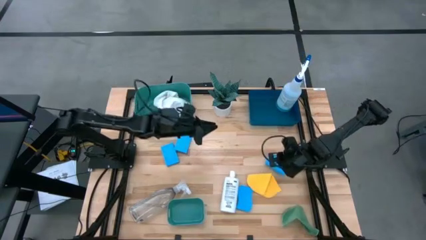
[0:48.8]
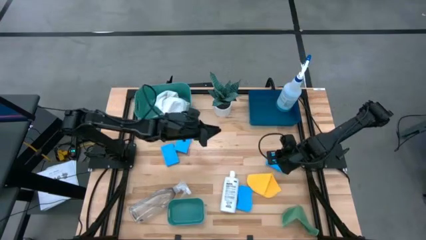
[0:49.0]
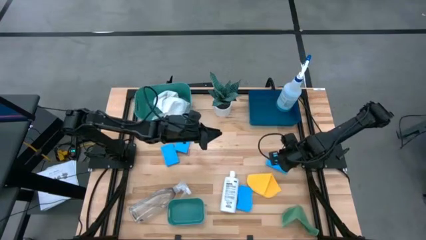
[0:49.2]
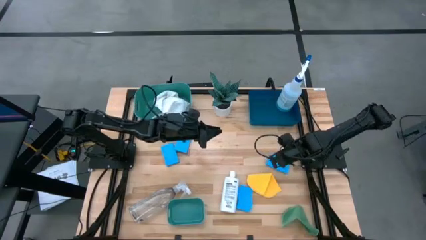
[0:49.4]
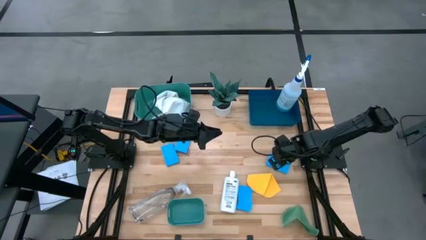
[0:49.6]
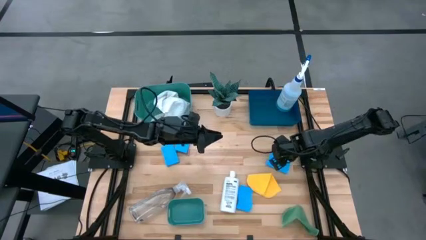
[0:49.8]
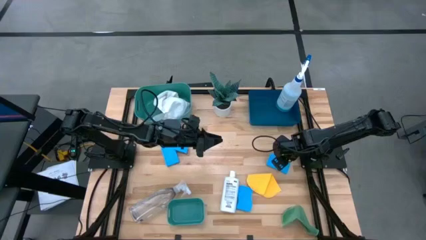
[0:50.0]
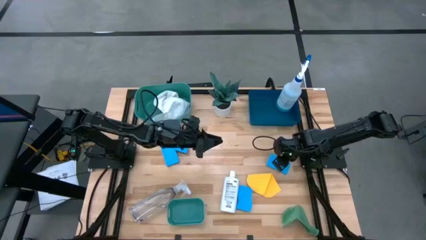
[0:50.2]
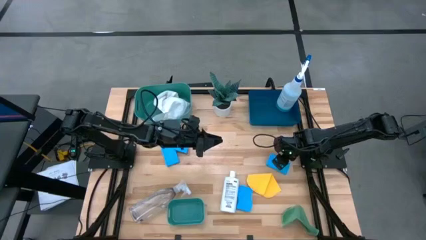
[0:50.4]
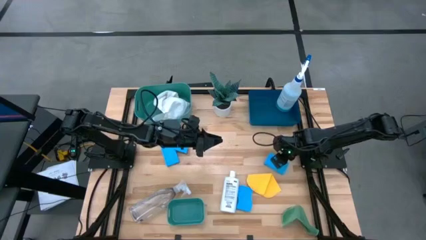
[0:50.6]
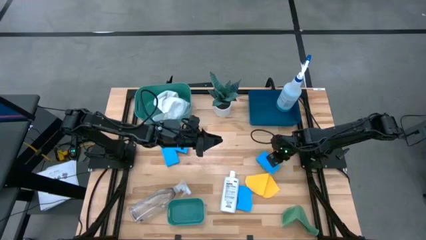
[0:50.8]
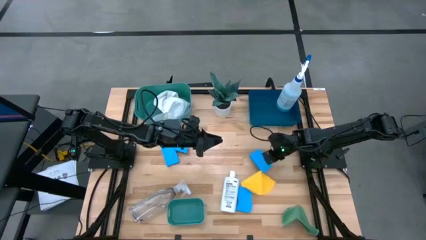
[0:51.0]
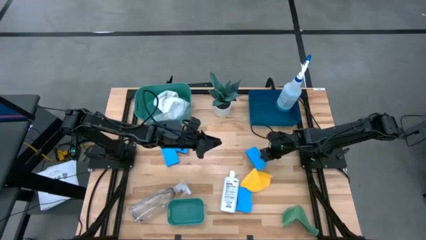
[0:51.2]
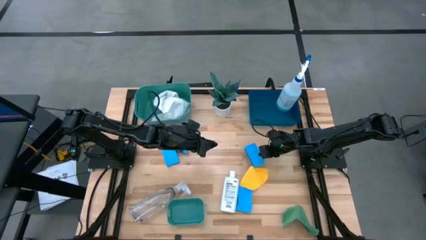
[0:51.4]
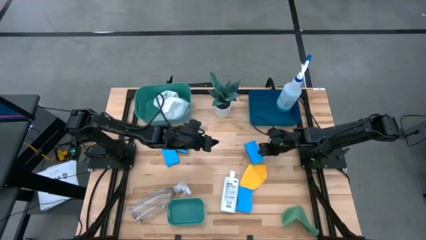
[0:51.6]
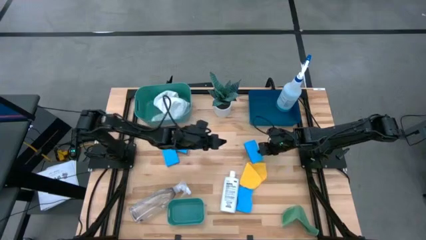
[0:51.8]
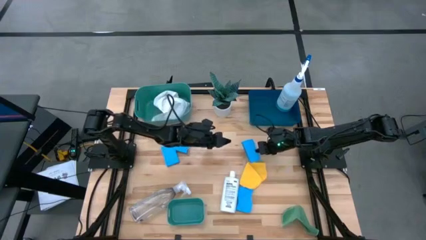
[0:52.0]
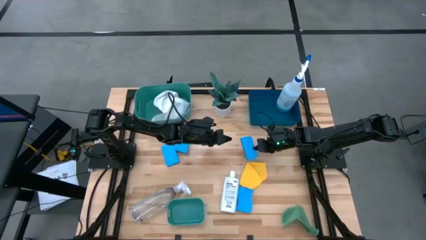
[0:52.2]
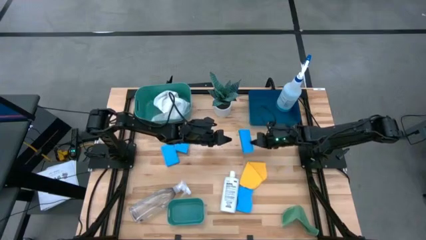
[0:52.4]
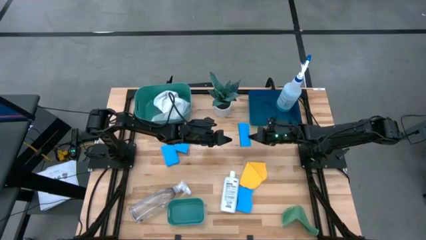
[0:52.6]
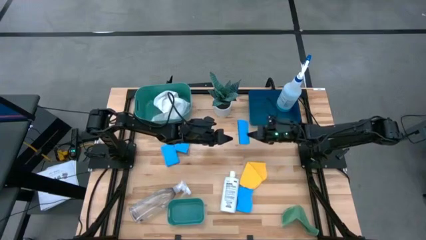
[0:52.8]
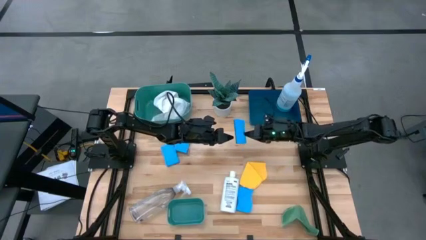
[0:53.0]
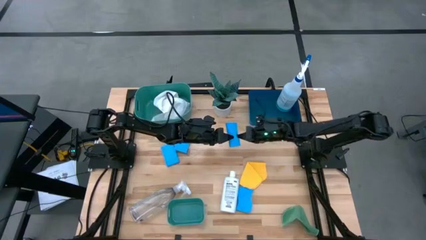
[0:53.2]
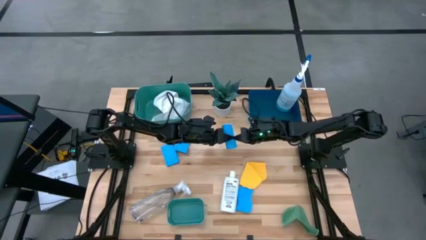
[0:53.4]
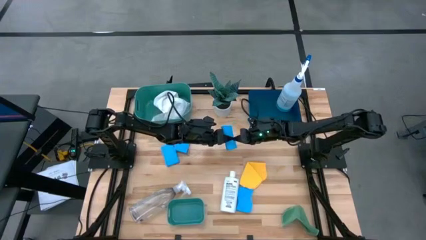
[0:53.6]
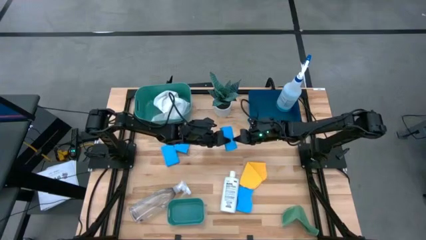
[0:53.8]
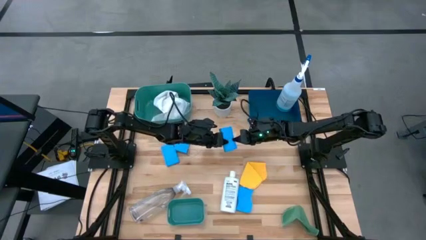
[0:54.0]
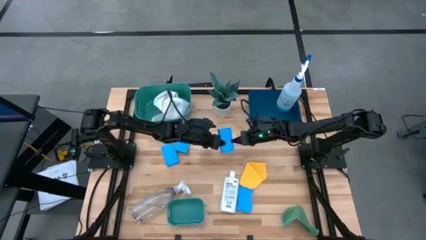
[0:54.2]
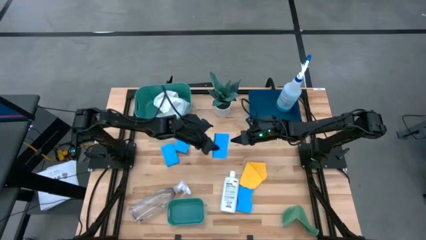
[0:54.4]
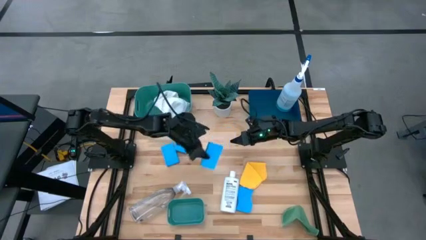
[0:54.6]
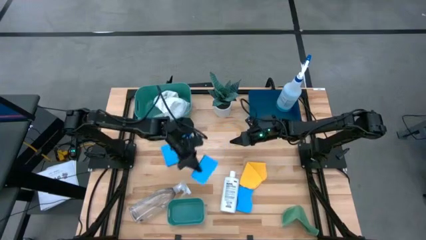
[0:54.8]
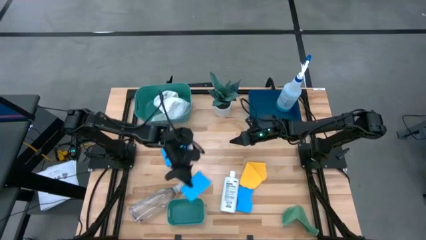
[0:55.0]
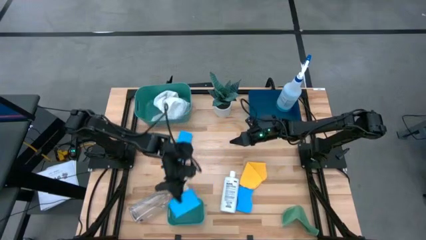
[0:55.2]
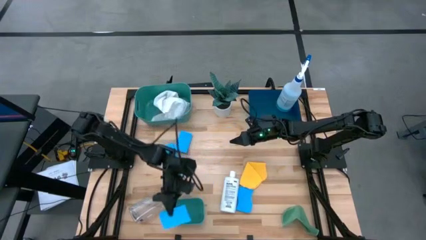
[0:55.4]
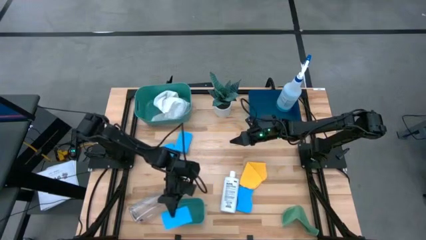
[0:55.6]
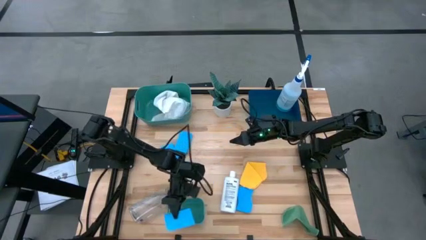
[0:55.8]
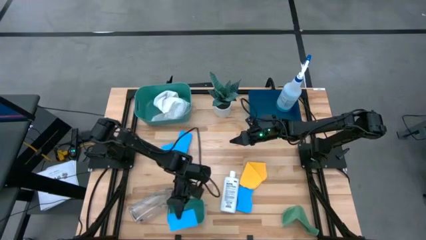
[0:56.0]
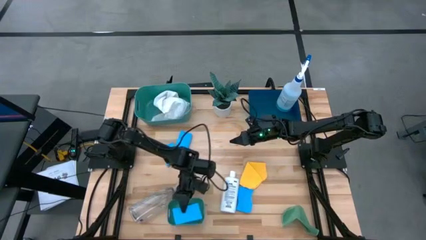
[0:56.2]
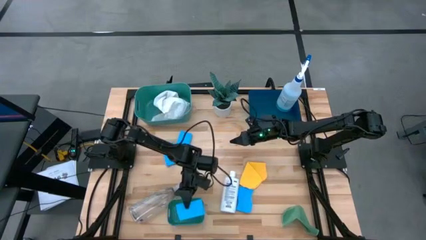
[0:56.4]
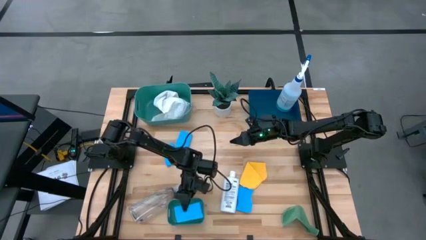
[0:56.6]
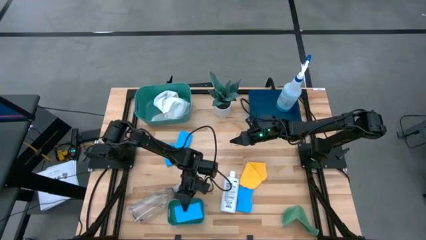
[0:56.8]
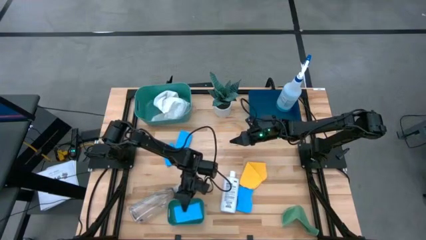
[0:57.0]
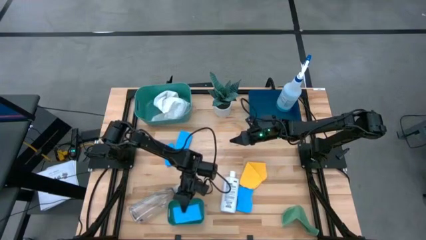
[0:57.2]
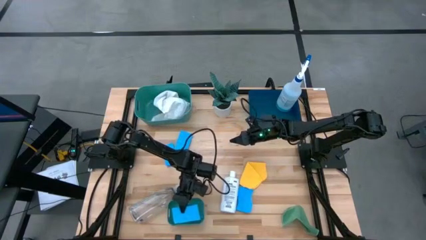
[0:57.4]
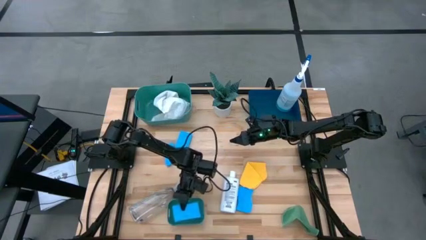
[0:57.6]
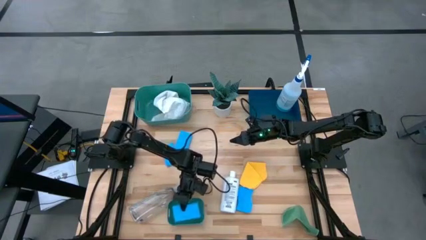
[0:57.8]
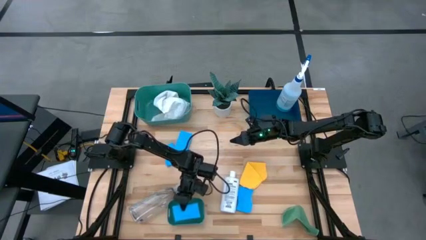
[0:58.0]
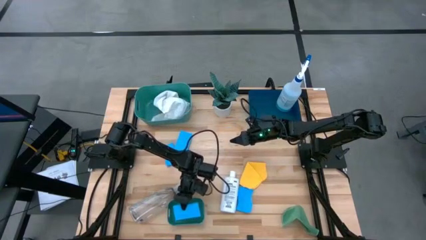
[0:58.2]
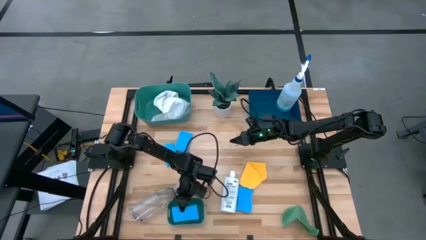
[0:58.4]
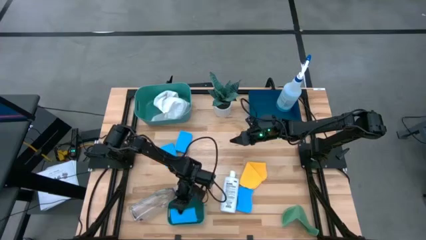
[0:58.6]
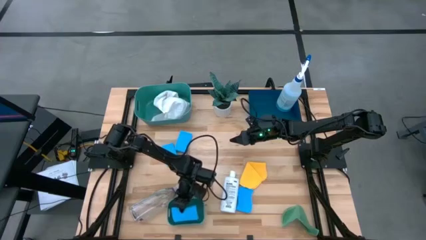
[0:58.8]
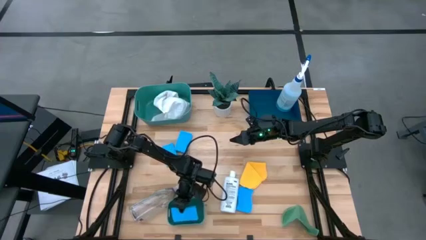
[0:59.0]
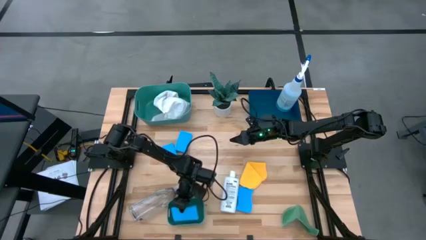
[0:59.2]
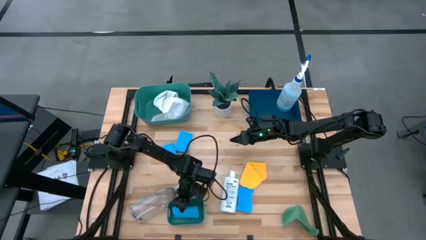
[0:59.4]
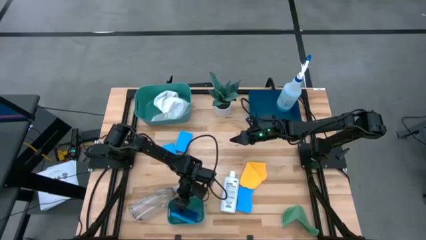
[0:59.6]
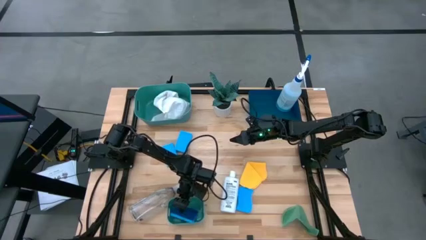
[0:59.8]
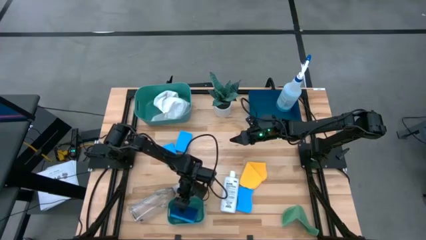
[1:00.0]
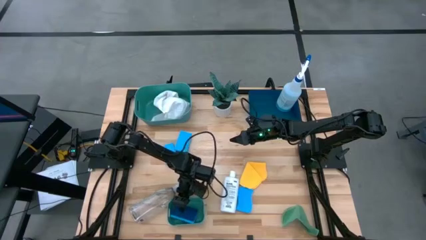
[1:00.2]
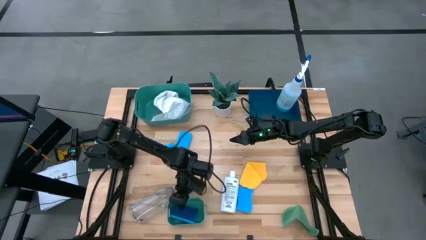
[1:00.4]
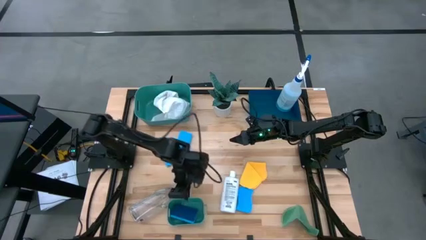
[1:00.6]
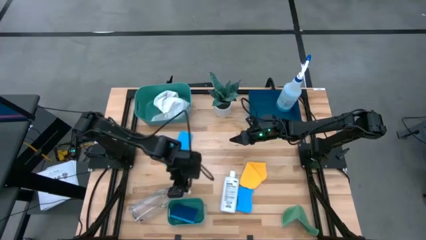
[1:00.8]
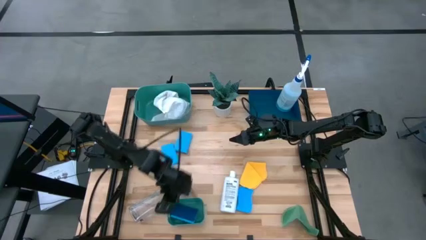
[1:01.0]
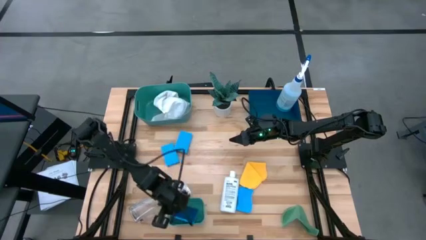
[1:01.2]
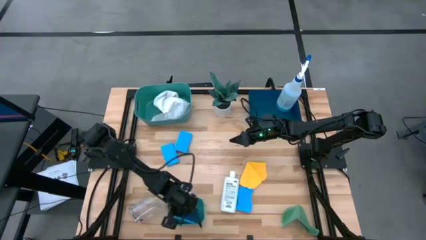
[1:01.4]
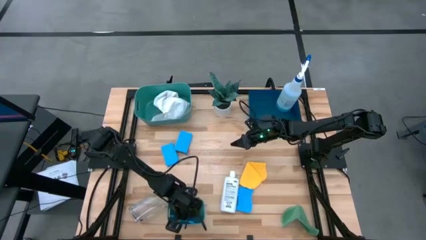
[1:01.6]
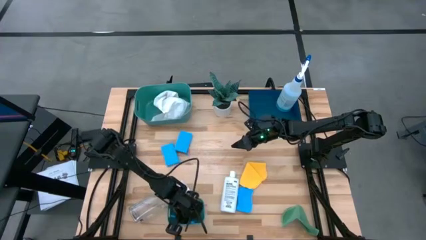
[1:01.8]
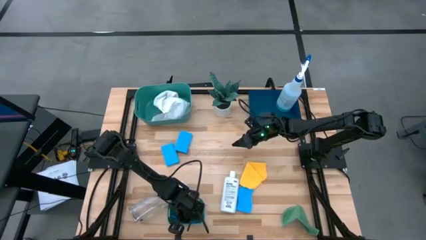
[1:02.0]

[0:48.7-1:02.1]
Task: Pick & Place Kitchen Items
Put the blue sponge into the bottom green bin

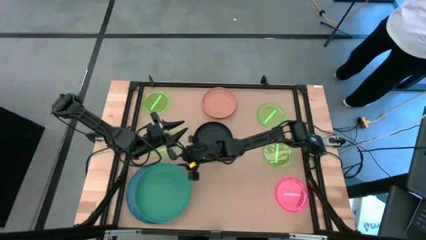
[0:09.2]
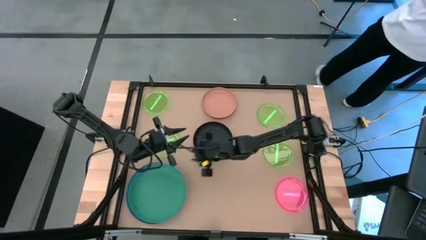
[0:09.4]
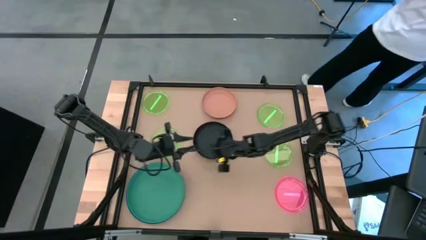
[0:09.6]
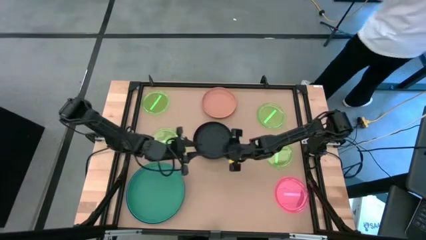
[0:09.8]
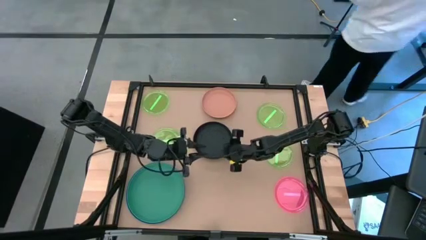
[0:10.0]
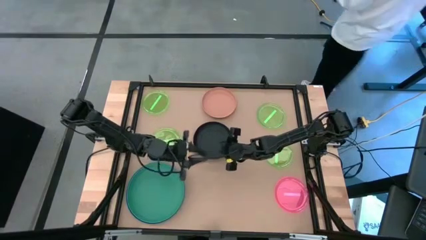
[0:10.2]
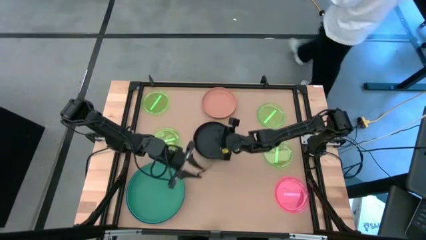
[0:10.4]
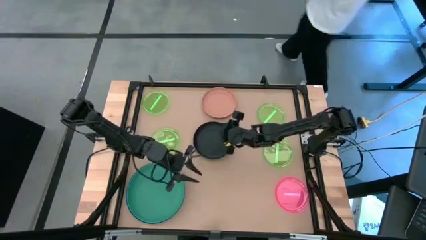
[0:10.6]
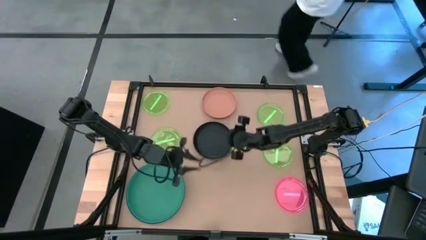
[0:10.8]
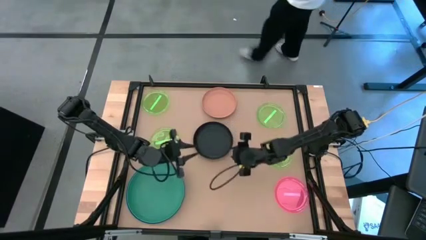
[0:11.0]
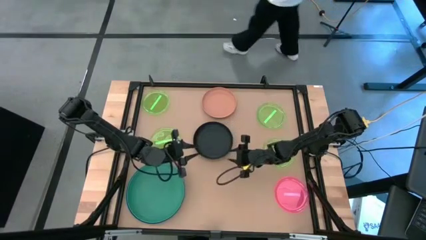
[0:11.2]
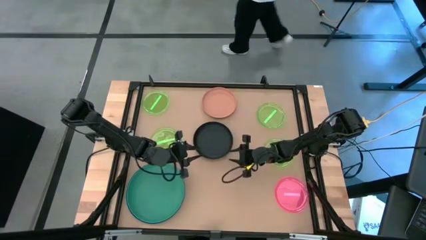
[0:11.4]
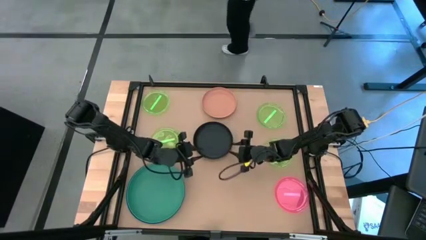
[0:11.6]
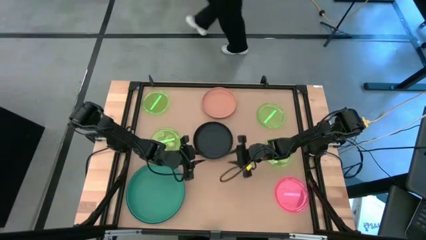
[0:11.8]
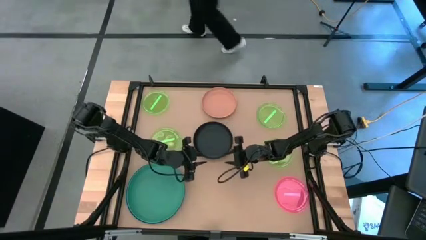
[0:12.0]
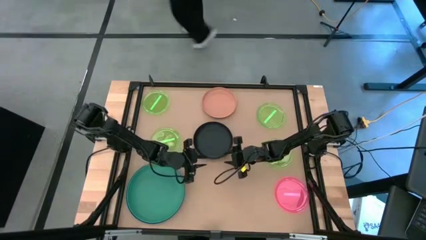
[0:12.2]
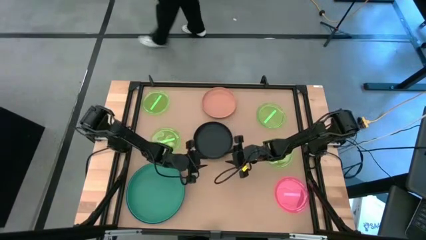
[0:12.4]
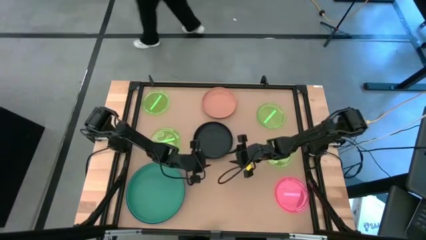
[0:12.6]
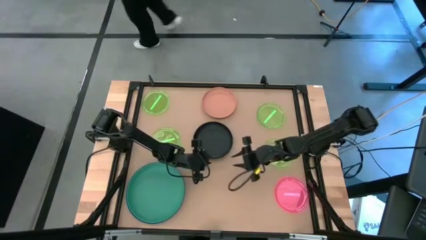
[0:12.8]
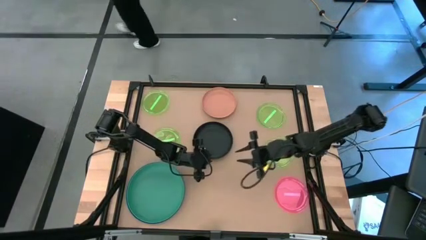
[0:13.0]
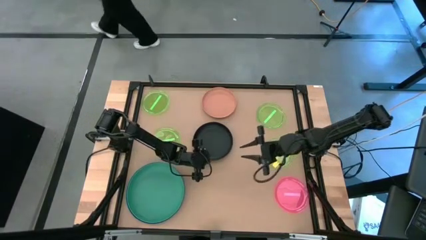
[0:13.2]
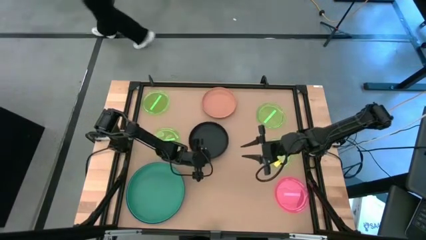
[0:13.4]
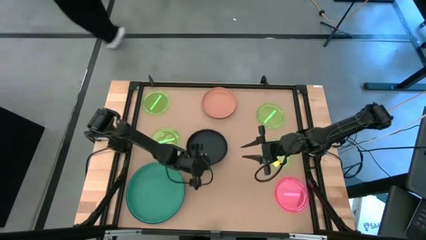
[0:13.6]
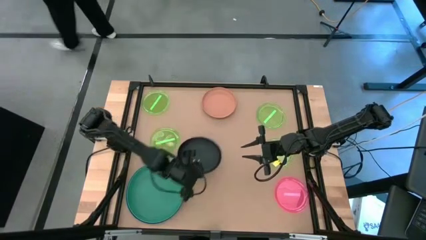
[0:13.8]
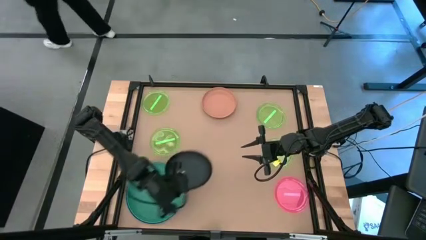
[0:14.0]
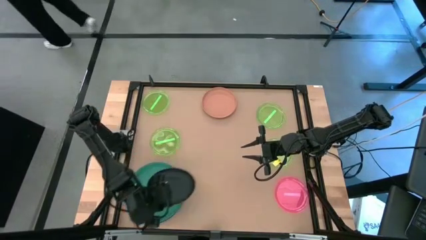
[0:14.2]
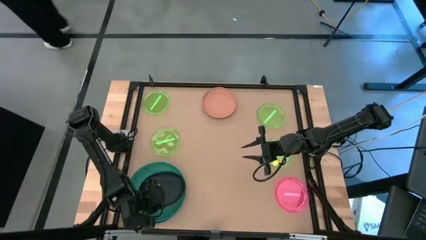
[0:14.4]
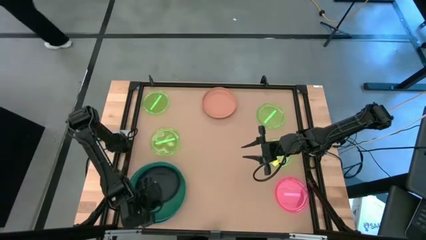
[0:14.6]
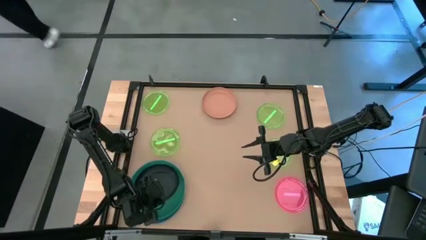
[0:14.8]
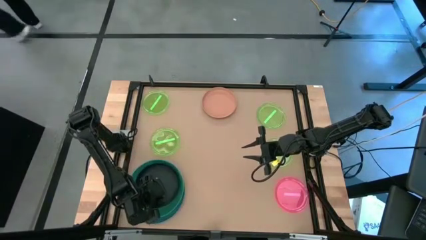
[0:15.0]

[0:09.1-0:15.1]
Task: Stack plastic plates
Stack the black plate on top of the dark green plate
